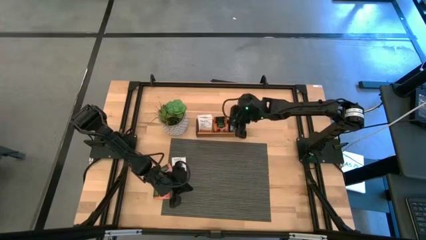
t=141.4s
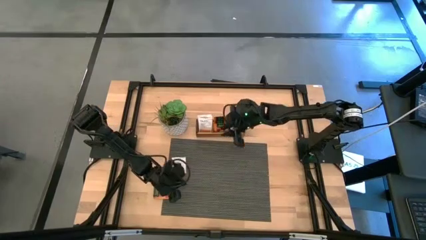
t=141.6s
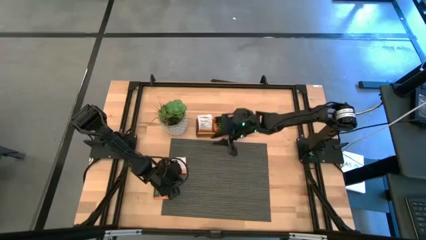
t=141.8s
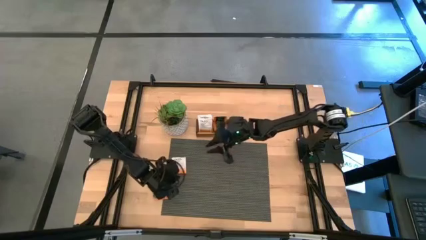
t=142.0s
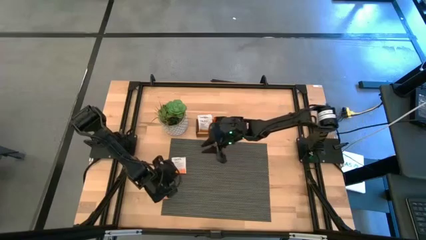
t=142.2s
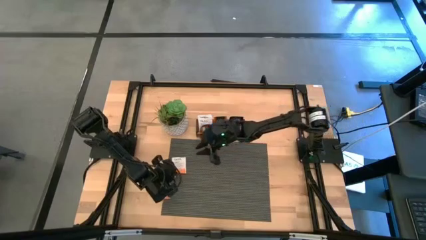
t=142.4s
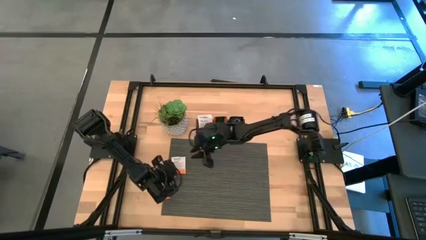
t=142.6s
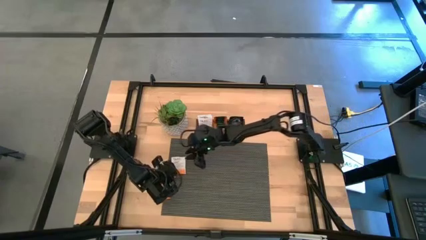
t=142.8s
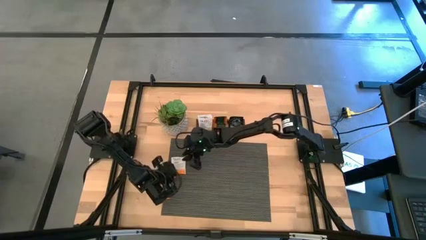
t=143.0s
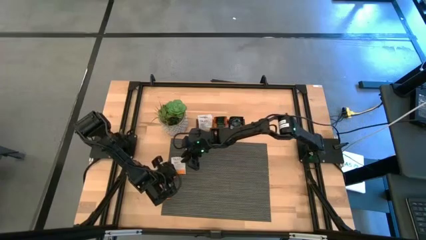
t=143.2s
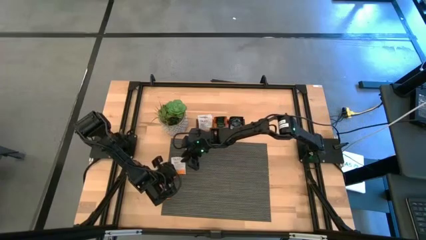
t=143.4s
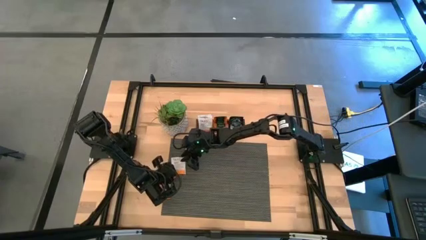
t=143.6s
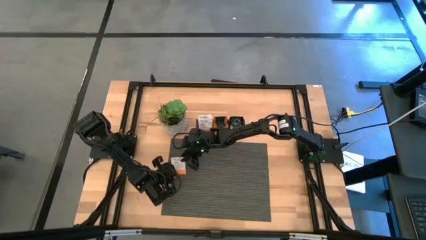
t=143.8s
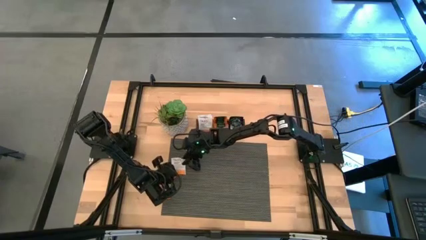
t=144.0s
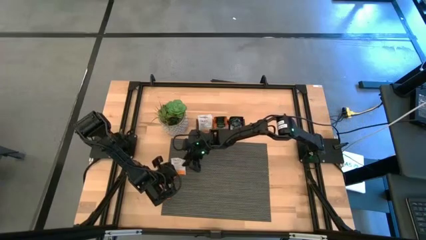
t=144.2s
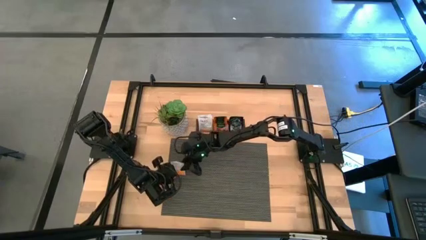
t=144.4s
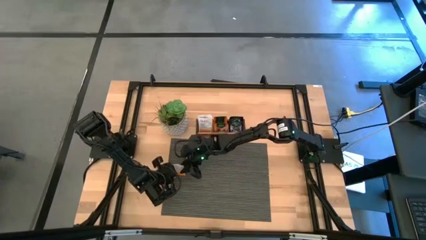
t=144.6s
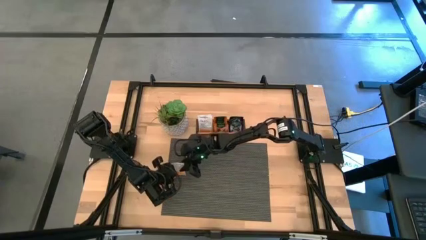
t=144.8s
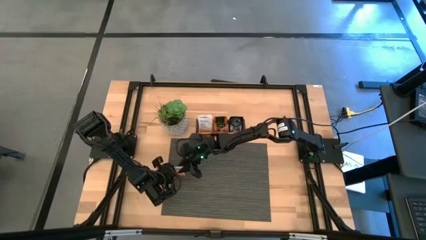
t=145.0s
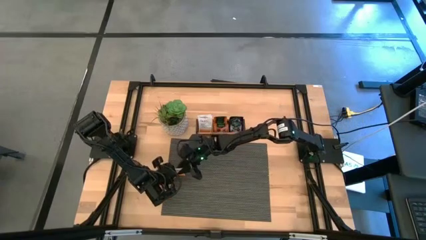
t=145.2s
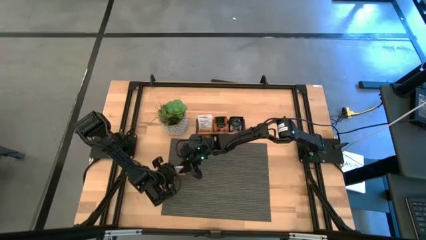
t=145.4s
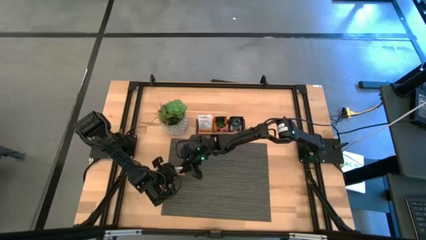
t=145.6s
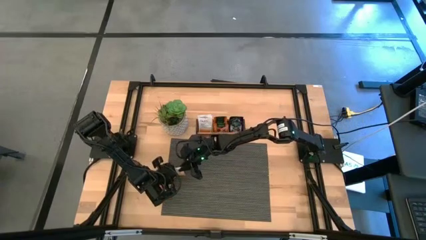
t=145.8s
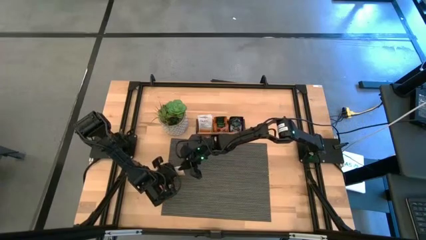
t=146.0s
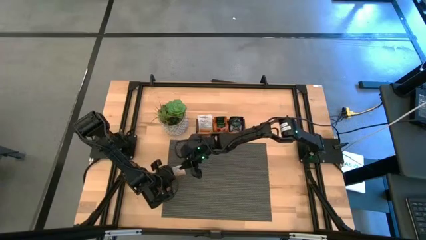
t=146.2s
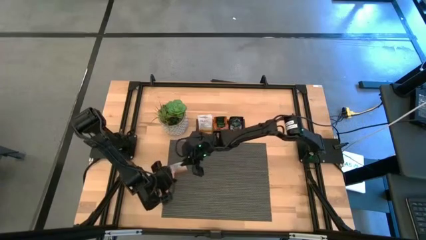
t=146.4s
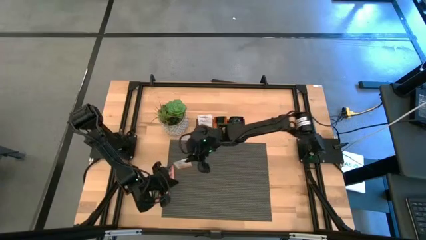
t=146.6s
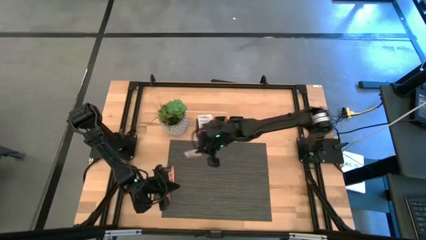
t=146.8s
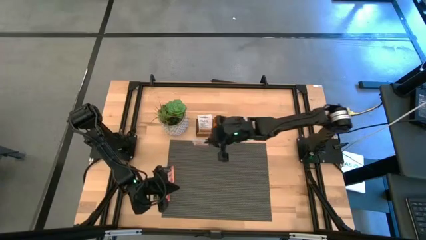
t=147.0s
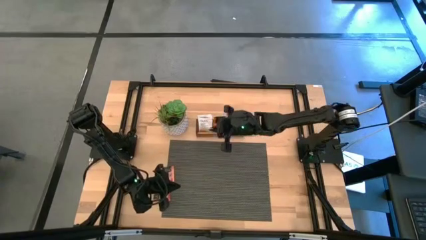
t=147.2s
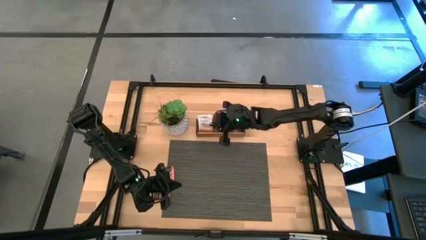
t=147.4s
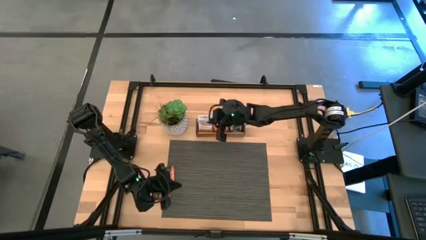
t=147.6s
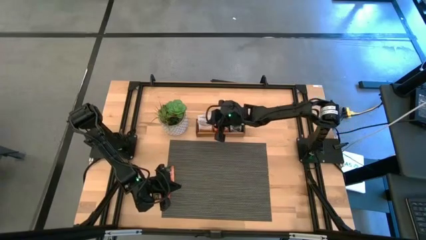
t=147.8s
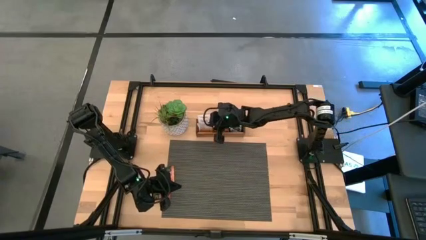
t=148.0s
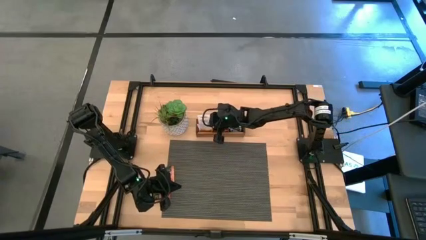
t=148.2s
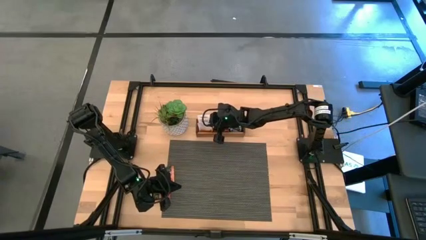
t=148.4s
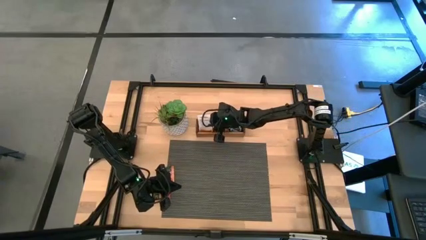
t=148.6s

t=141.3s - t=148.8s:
Task: Pick & Place Tea
Put the white tea bag into the left section of the wooden organizer

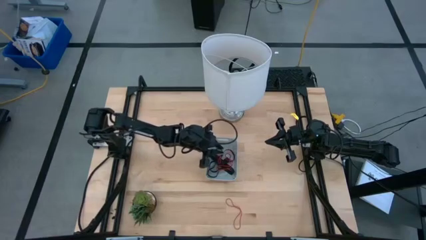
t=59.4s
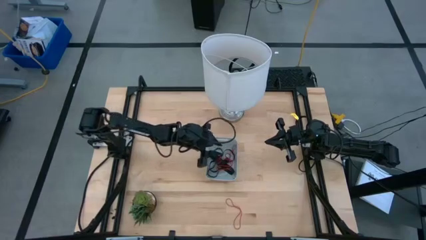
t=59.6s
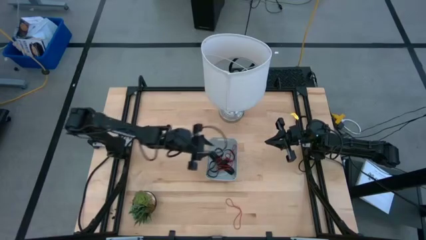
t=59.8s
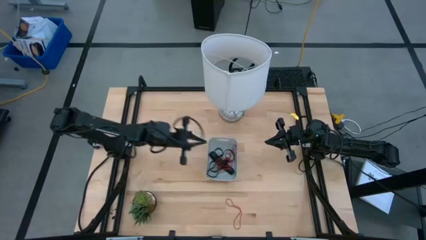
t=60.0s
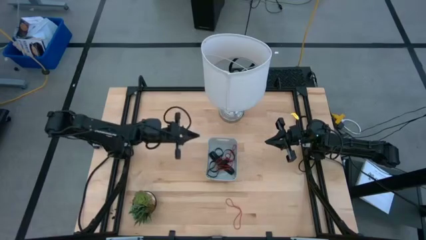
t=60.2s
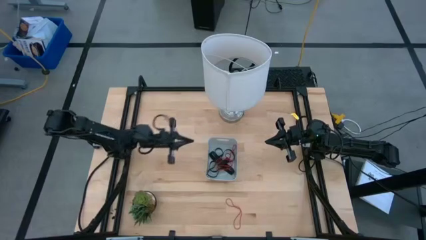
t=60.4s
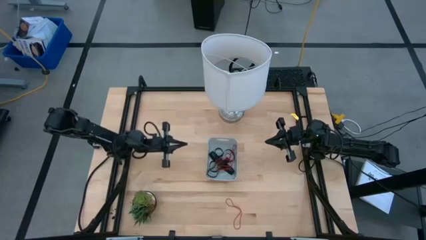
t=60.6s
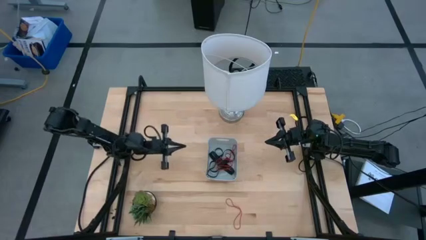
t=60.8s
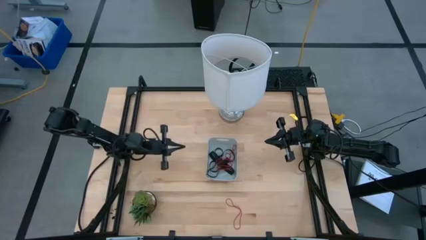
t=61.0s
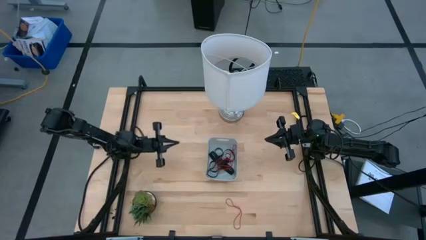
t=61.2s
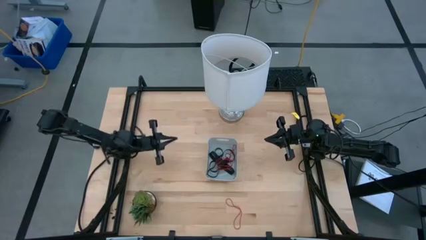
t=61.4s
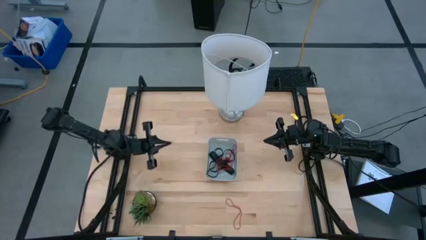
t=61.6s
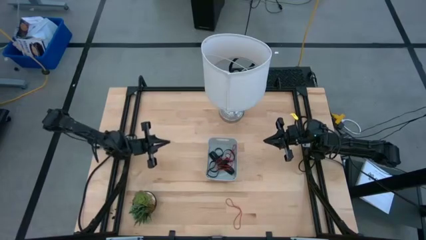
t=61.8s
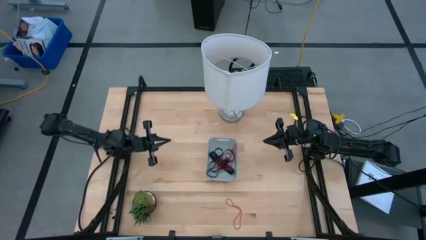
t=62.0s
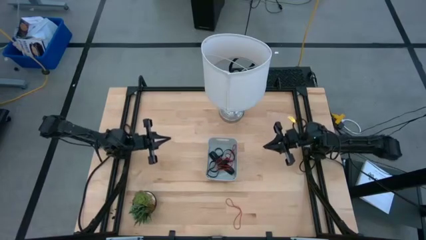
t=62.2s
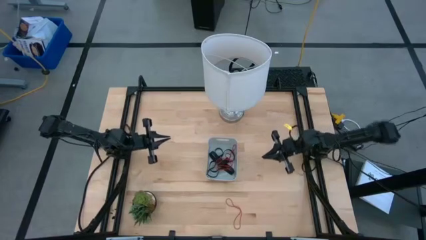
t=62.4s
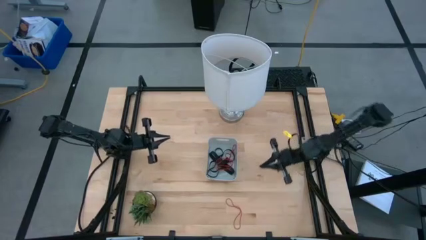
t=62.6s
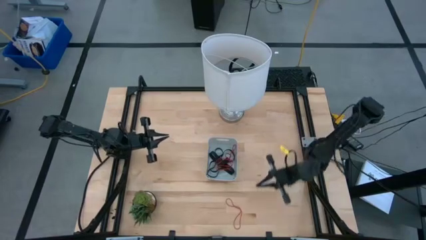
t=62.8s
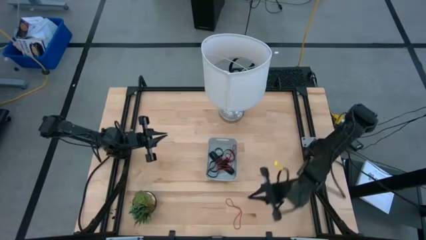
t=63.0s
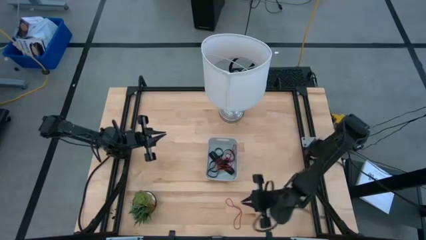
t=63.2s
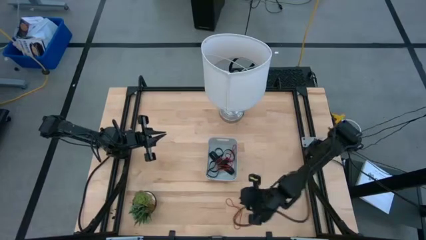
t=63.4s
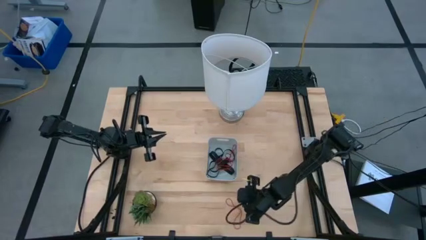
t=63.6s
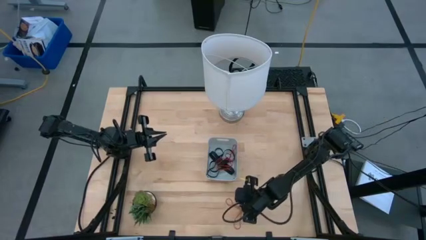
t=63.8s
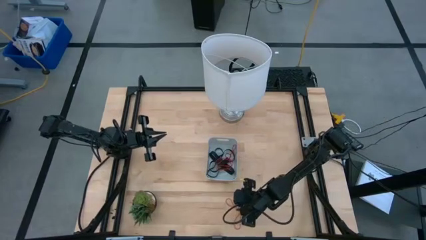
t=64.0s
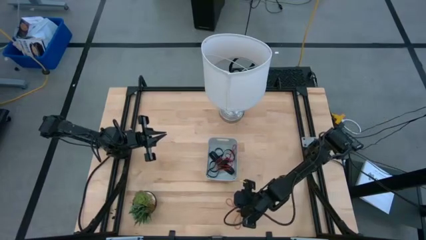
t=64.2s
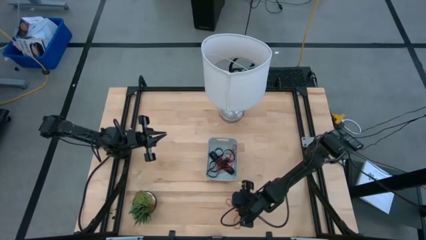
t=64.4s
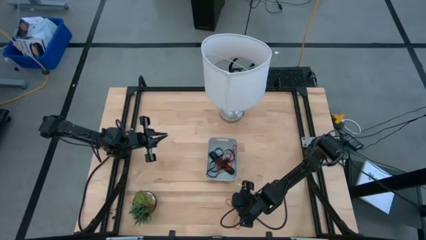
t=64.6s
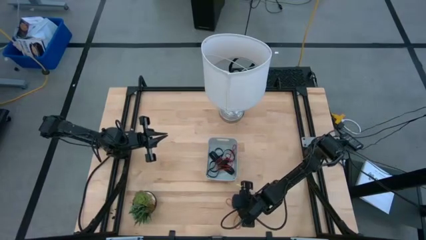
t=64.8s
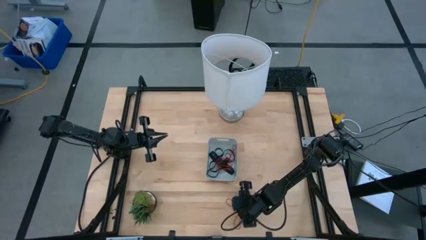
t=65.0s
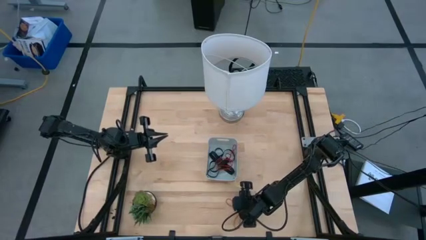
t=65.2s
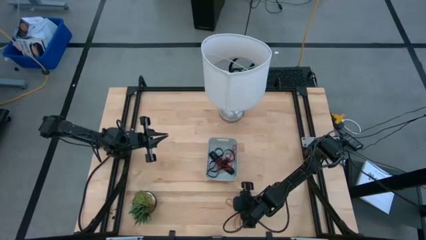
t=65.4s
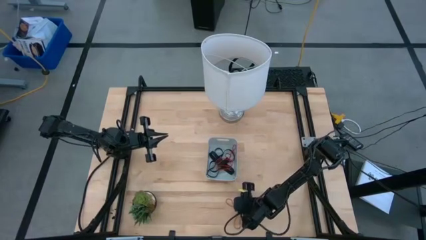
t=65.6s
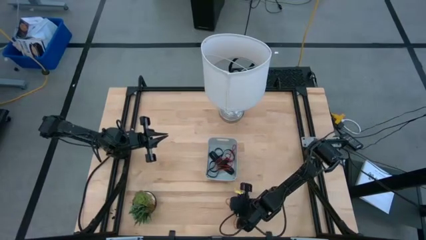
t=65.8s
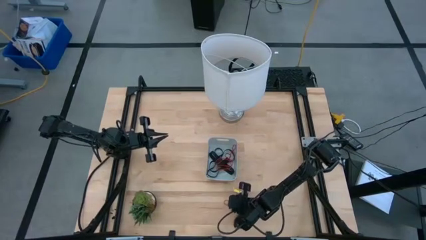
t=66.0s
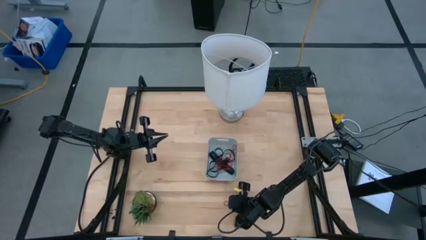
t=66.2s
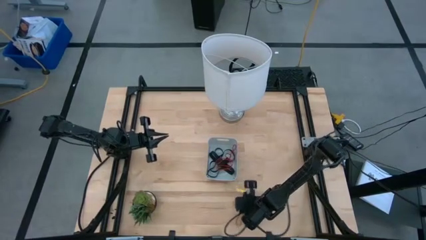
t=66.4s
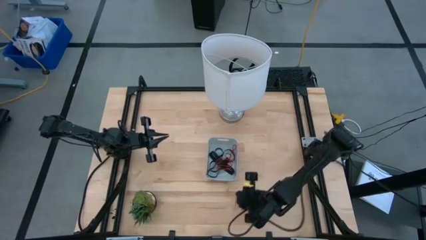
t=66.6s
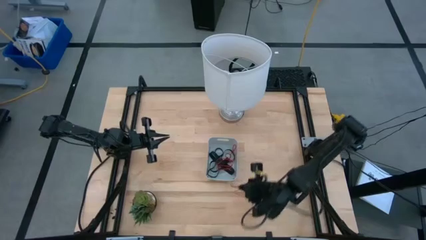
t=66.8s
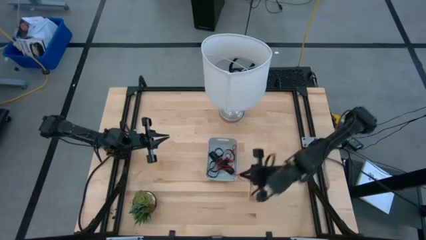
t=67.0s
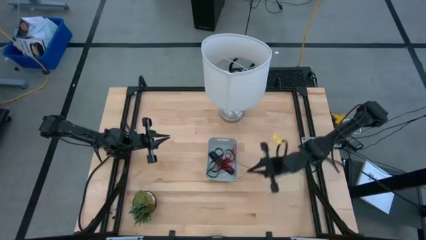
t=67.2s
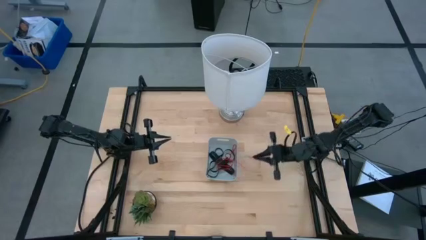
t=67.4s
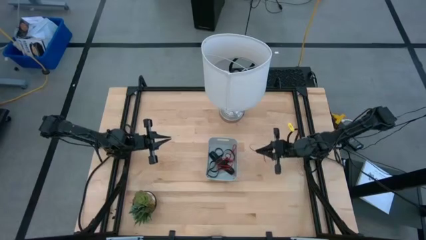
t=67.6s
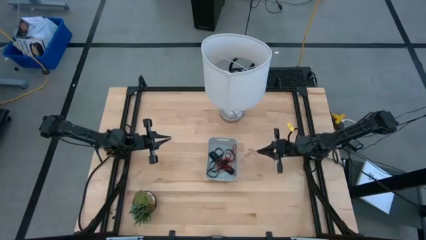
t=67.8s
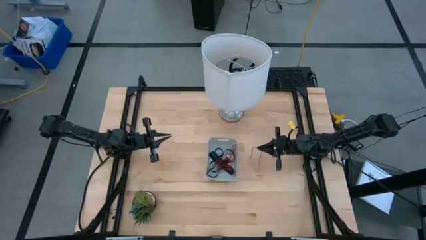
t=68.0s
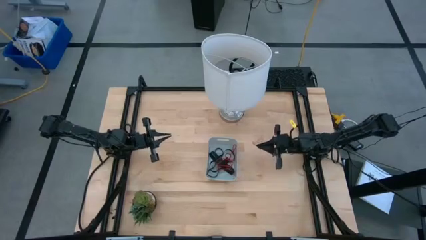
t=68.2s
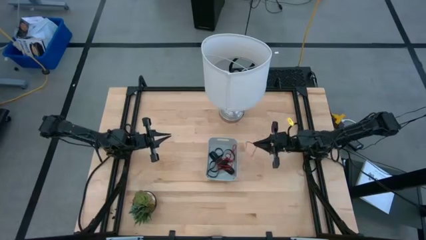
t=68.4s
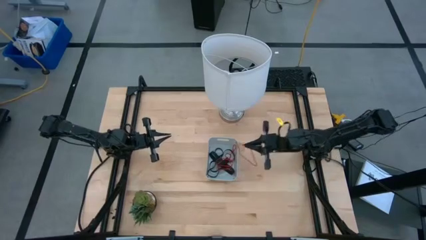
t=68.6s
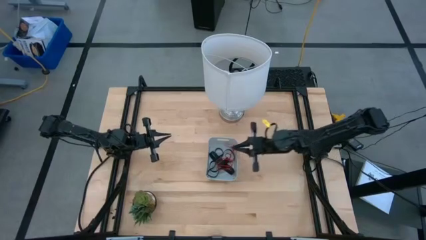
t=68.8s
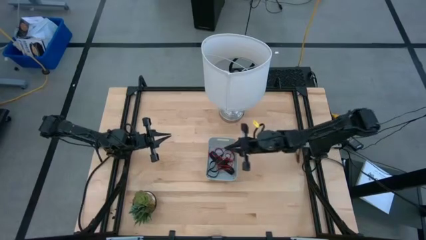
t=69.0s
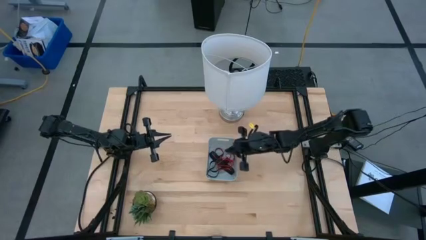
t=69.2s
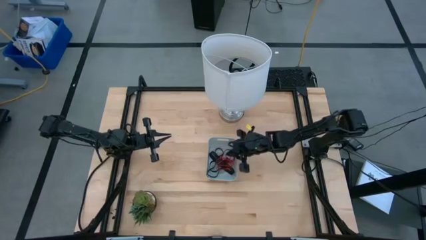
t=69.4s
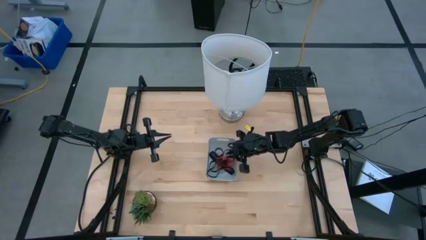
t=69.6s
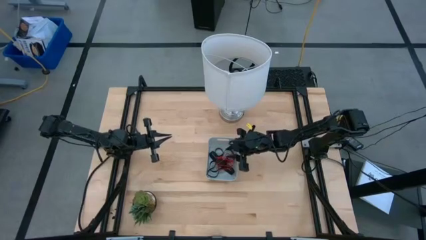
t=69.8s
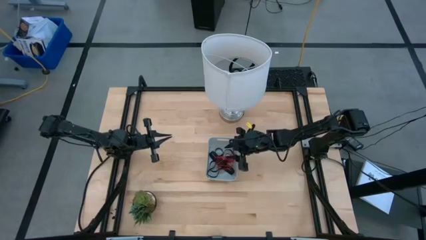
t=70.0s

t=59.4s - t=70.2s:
Task: Pick and place rubber bands into bin
Put the red rubber band into the gray bin
